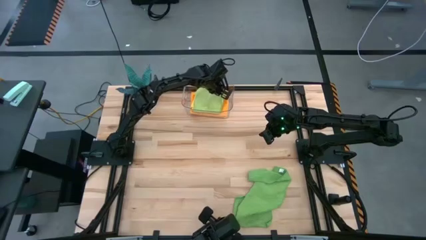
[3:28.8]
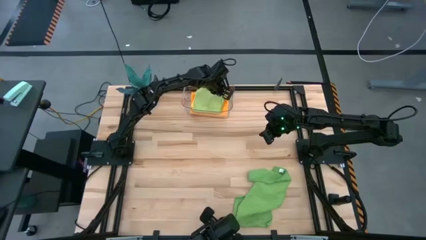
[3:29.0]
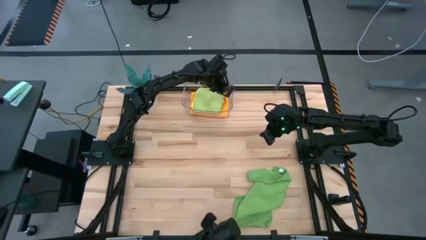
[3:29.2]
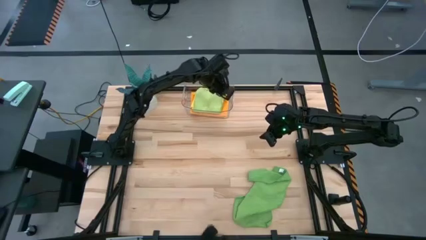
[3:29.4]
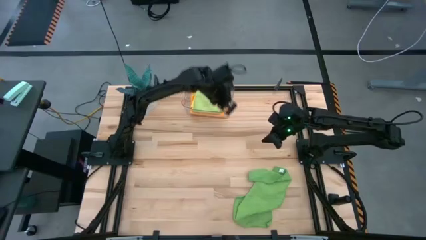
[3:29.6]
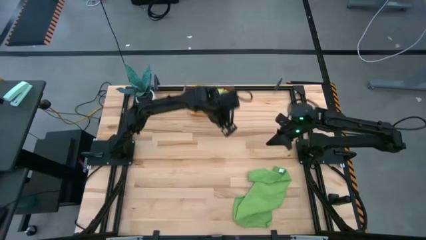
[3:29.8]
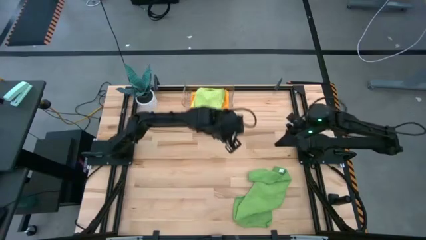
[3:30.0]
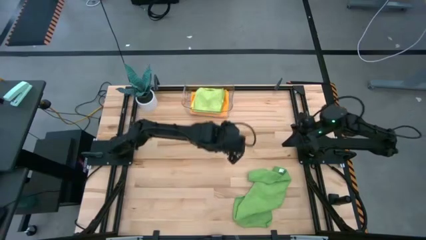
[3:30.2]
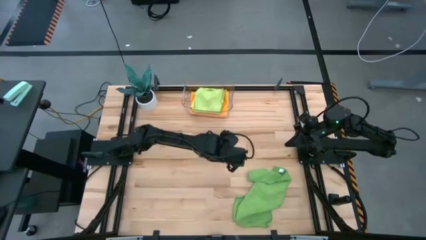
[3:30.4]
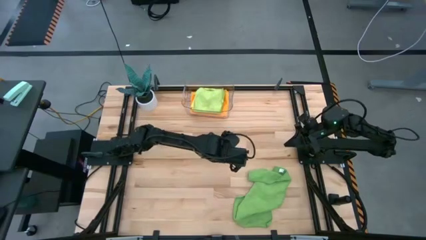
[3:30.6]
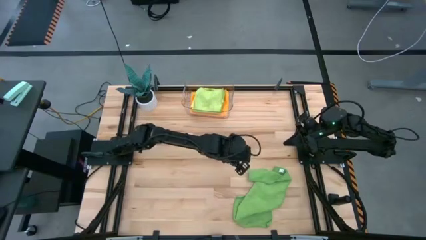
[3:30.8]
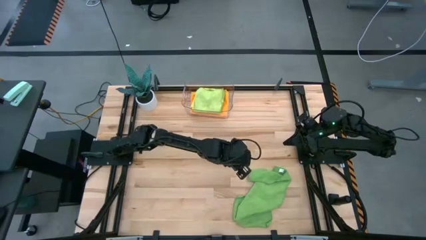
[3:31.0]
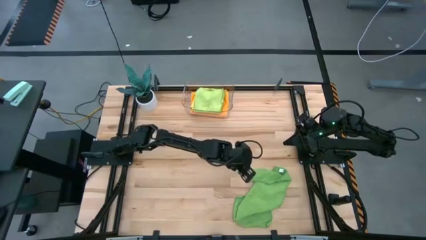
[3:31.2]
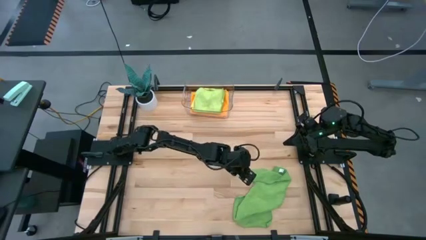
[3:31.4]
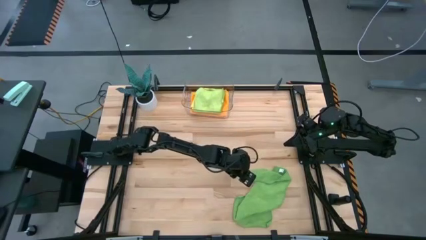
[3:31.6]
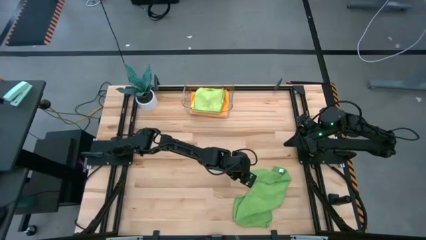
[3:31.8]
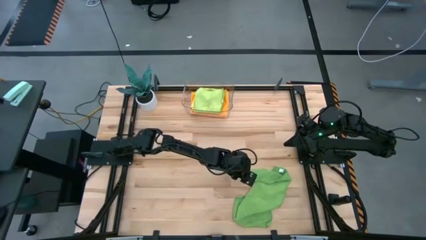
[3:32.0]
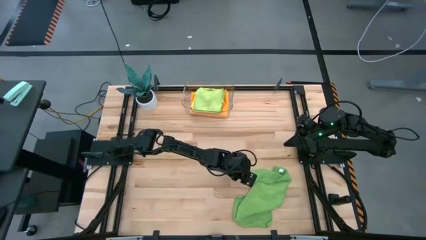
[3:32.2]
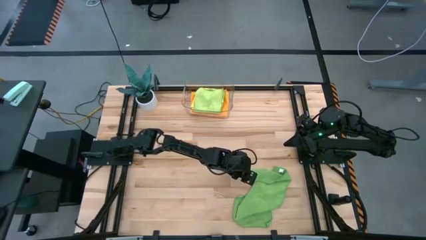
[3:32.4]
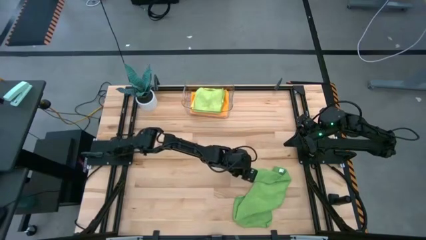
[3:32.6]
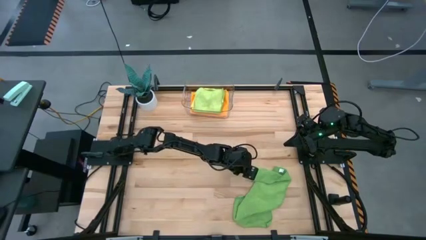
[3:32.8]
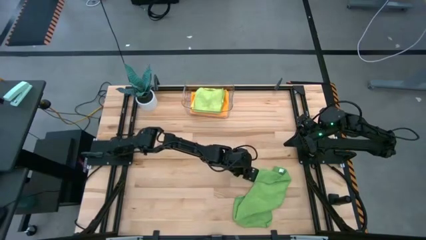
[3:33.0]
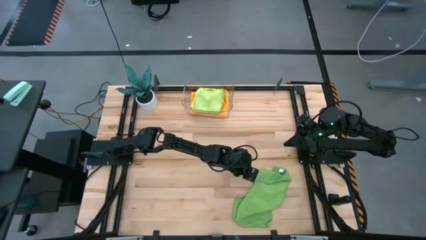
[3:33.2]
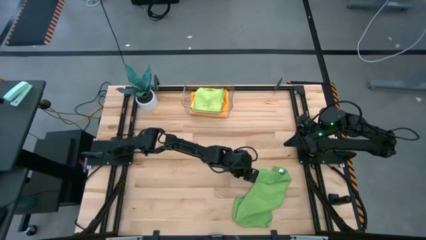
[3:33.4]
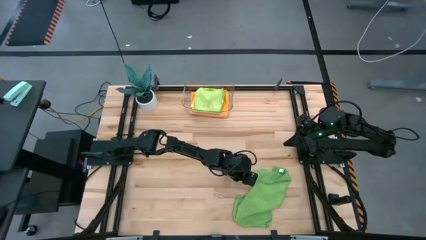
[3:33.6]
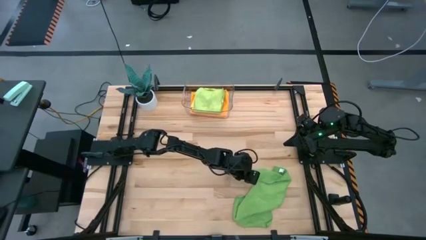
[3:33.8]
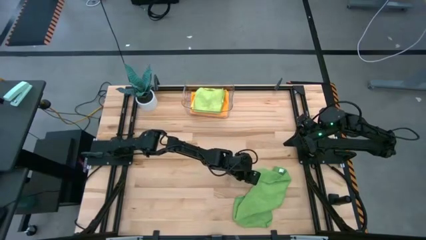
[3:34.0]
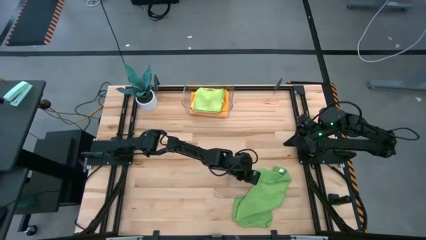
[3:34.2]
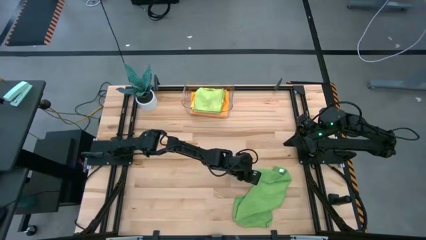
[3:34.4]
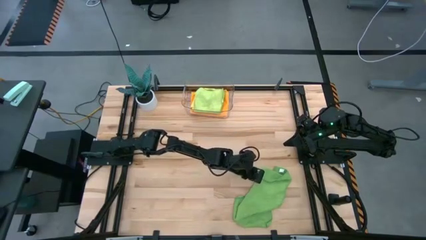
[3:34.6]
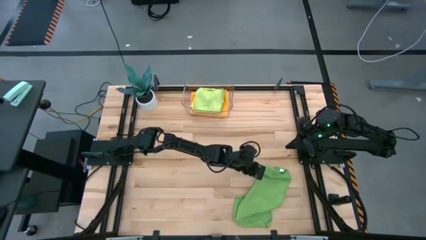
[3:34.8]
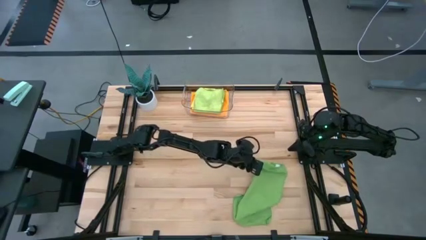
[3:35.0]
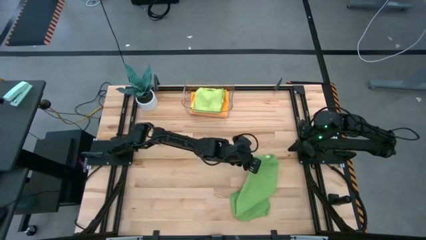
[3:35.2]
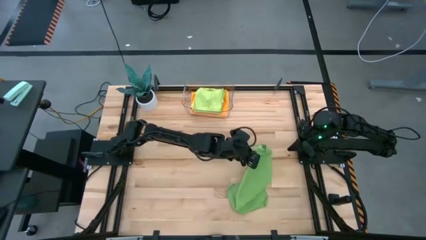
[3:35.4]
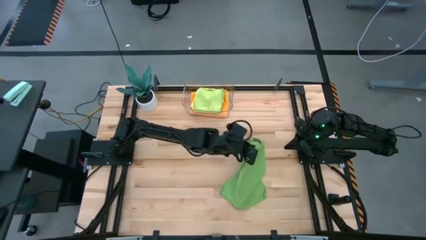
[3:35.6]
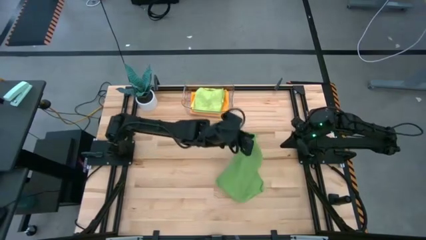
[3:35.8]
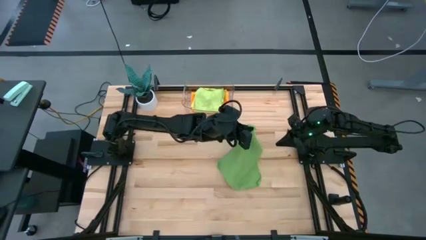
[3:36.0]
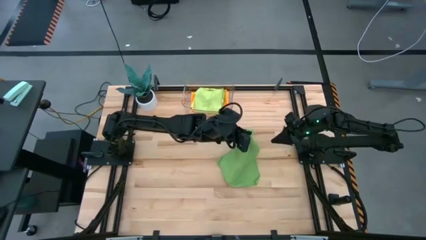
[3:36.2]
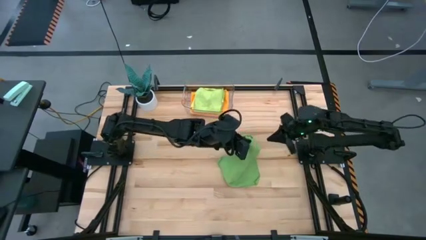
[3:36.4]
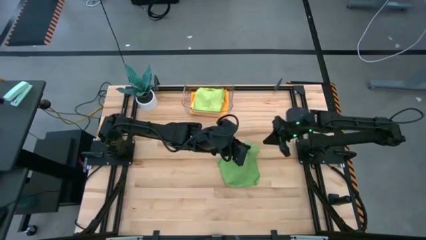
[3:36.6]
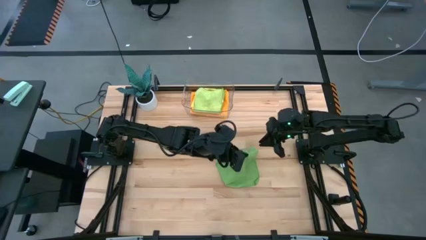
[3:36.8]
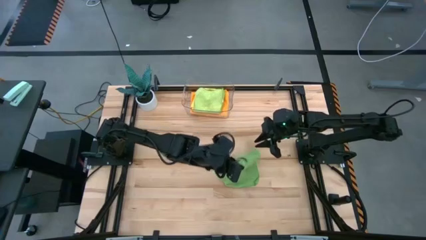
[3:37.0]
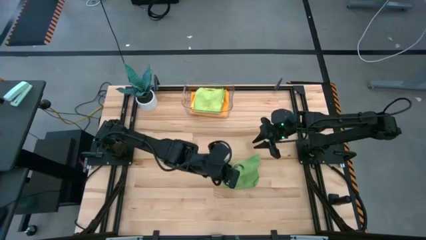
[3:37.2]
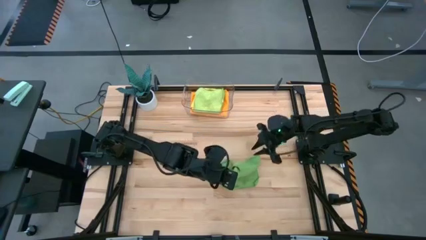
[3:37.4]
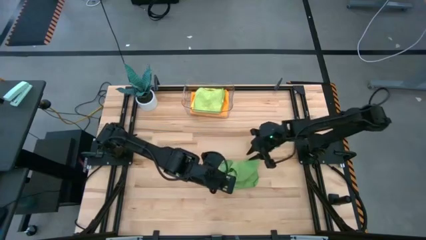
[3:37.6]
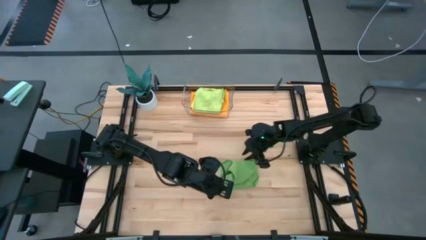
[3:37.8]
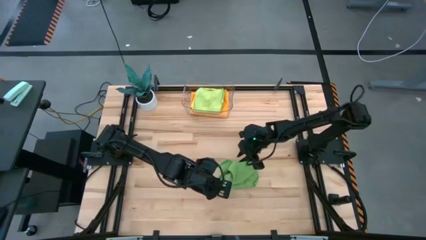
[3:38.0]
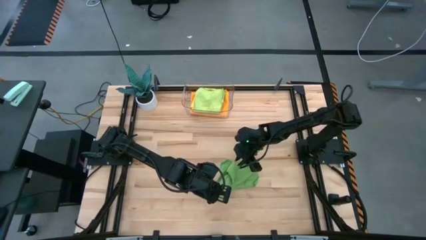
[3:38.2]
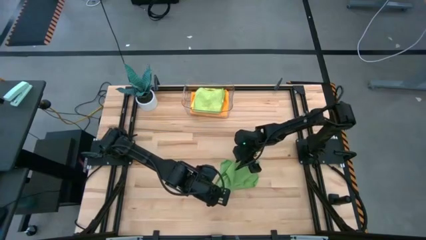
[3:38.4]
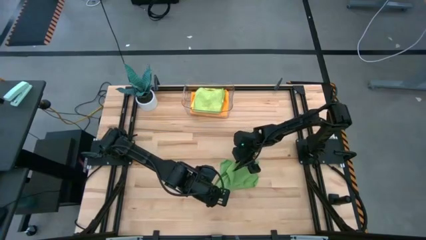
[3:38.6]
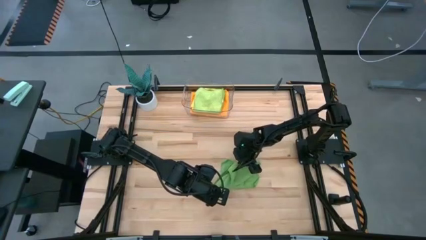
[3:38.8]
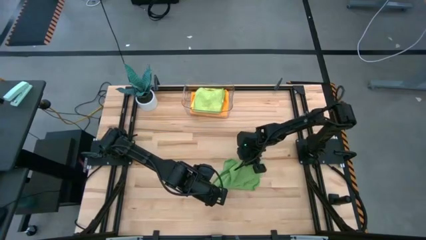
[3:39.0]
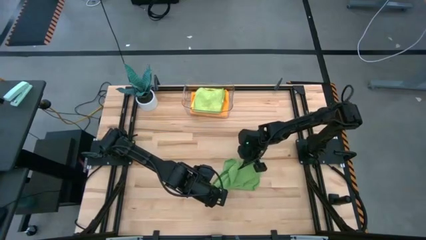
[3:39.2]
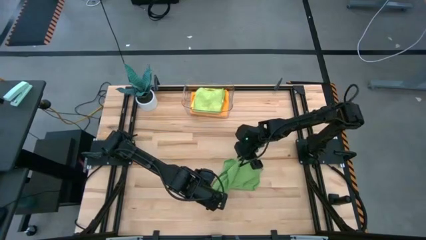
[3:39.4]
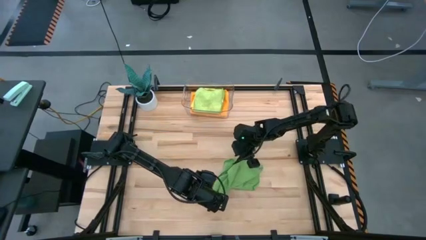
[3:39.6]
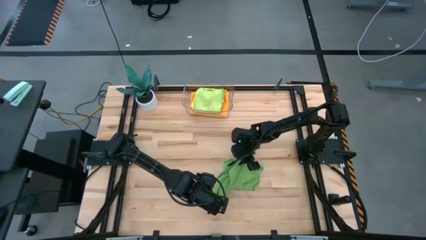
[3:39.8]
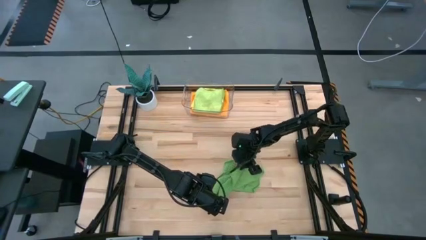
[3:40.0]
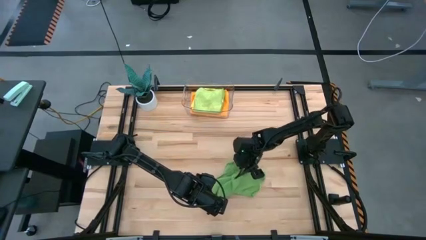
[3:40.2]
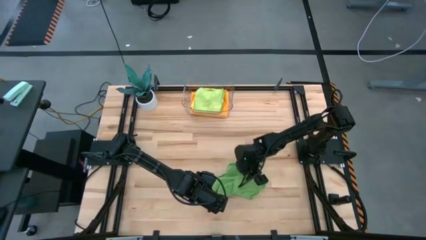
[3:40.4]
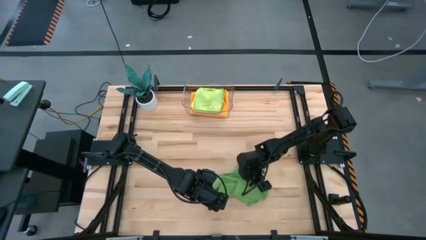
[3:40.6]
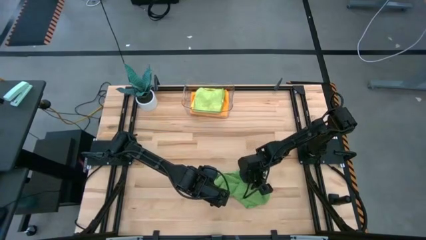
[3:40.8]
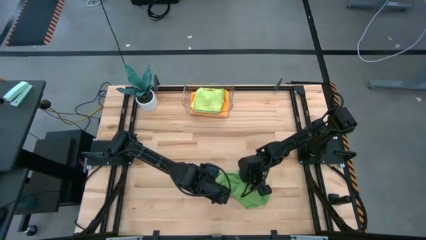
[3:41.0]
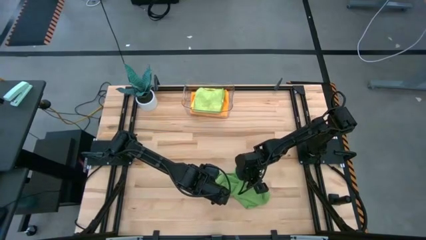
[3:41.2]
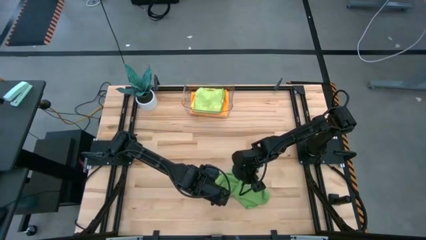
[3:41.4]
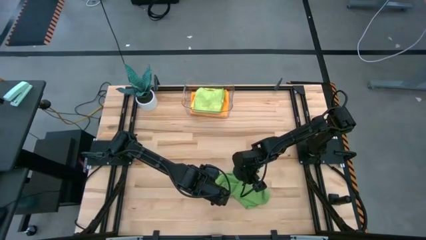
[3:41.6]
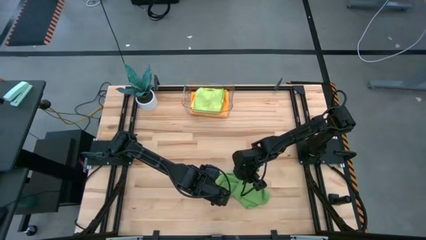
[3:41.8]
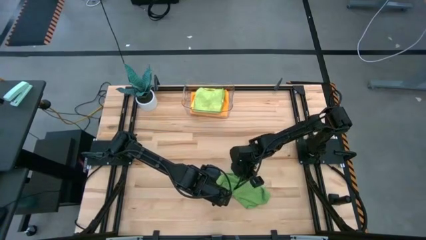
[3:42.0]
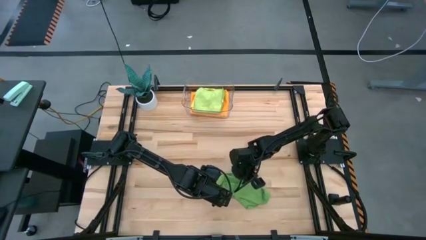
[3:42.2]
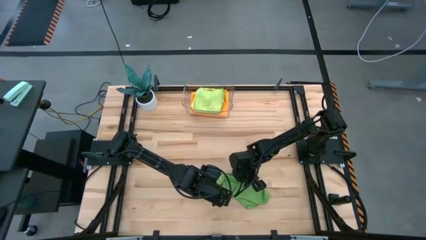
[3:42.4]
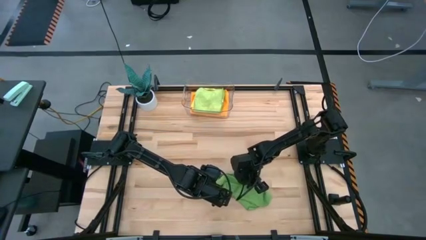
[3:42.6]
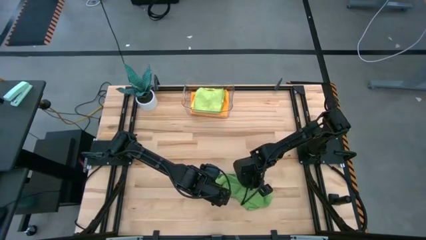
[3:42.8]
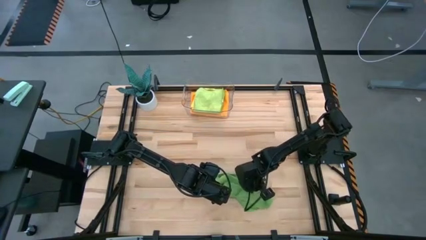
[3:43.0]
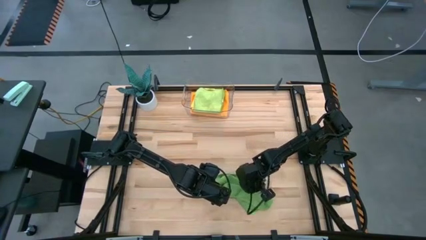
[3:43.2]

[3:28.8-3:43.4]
Task: Fold microfiber towels
Fold the green towel
